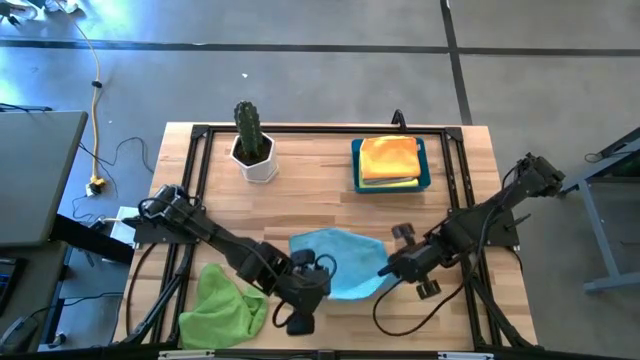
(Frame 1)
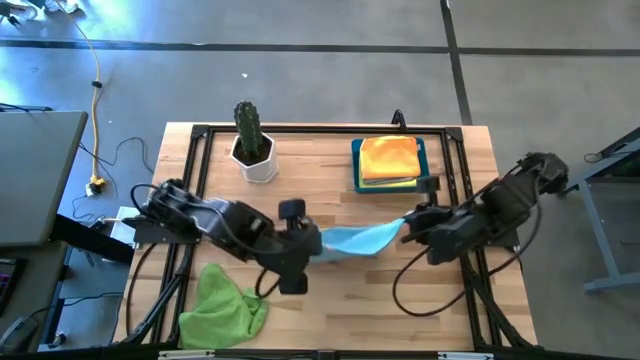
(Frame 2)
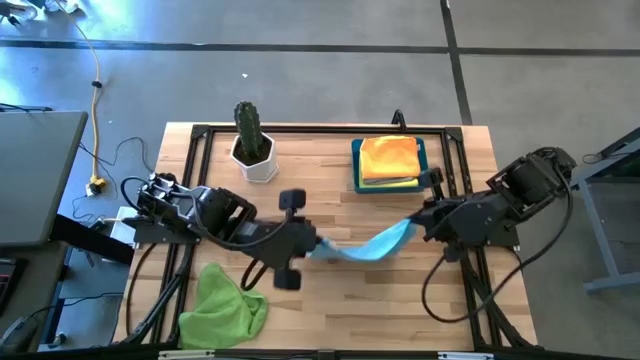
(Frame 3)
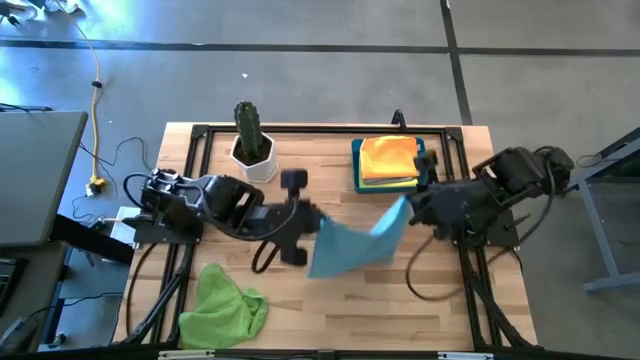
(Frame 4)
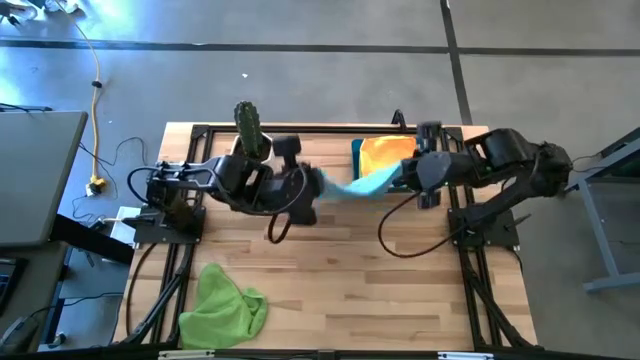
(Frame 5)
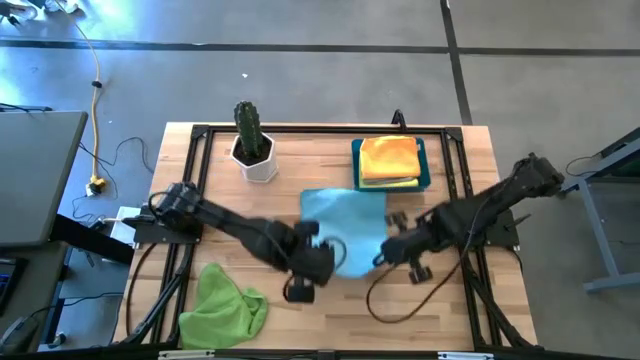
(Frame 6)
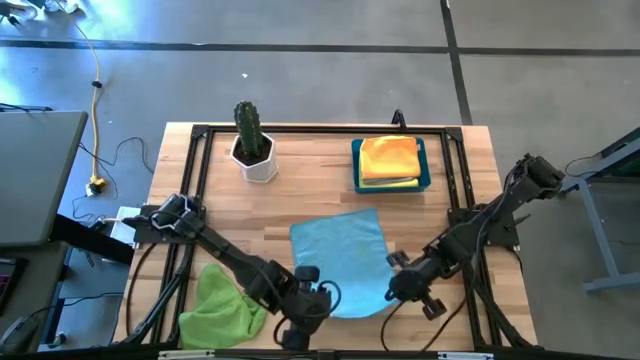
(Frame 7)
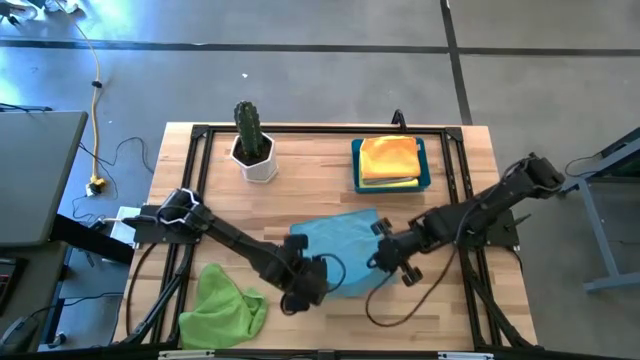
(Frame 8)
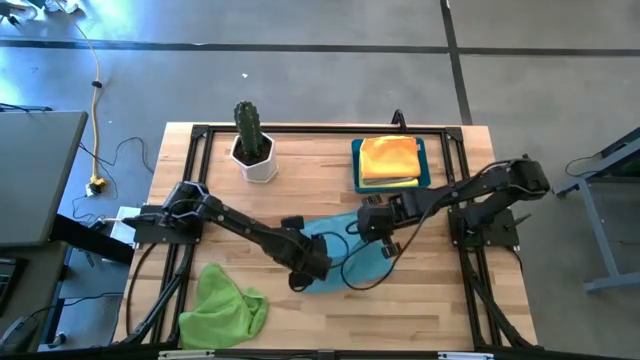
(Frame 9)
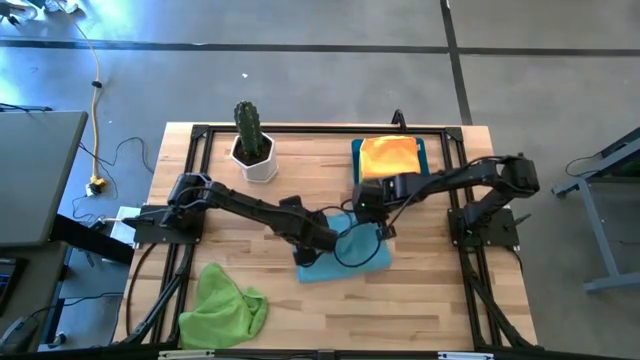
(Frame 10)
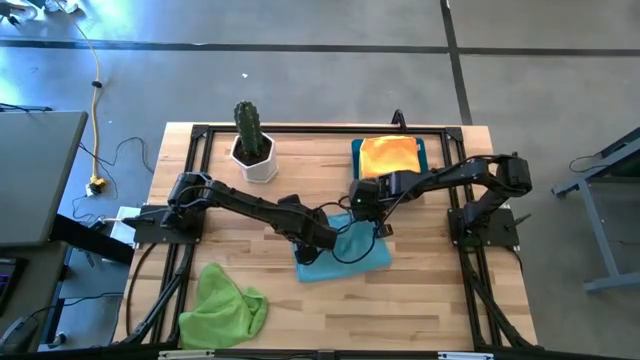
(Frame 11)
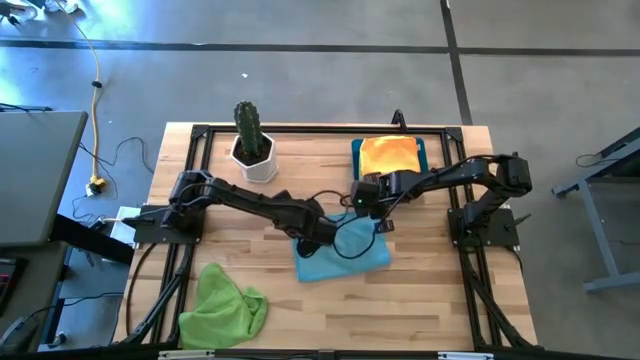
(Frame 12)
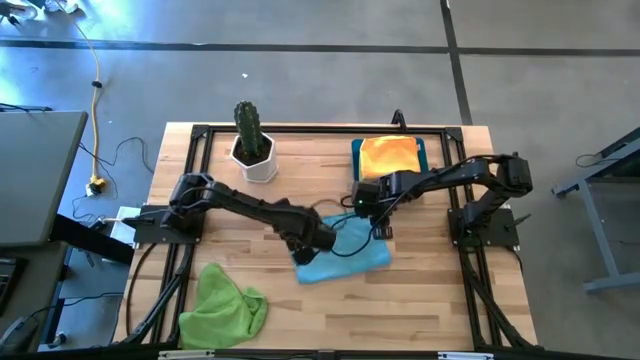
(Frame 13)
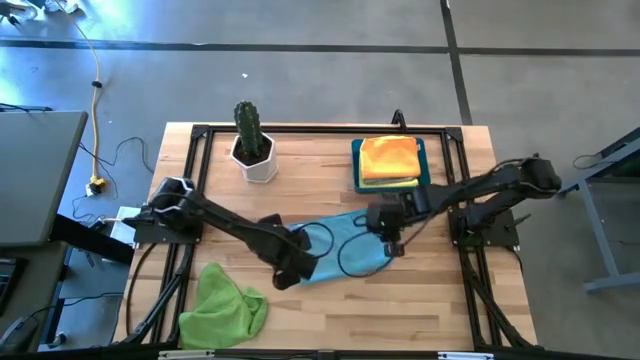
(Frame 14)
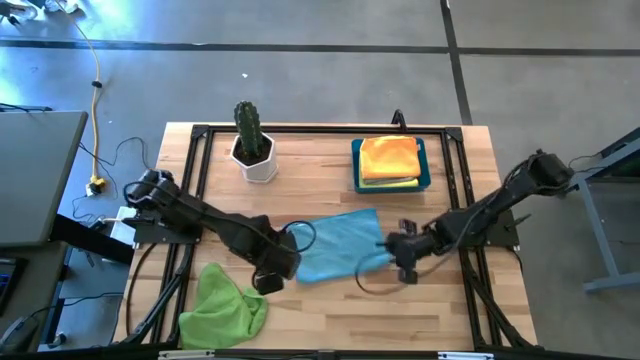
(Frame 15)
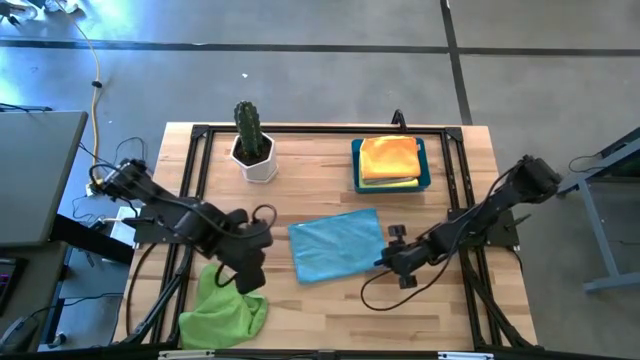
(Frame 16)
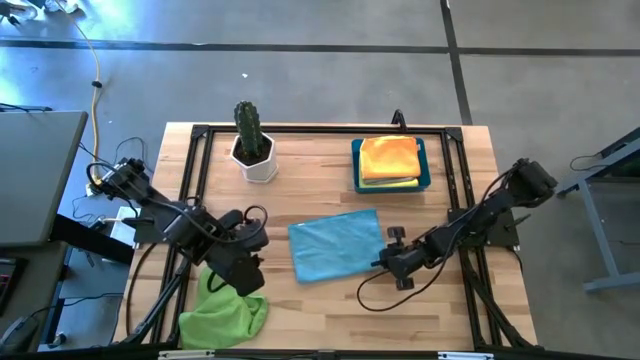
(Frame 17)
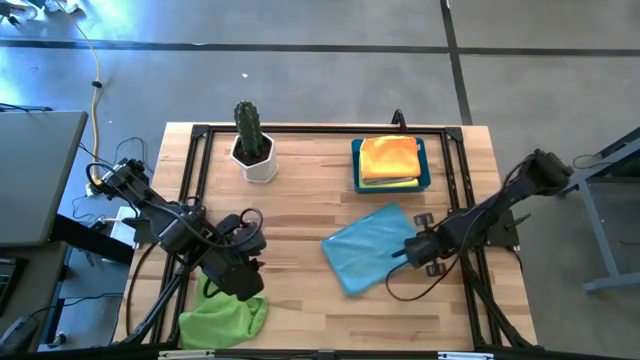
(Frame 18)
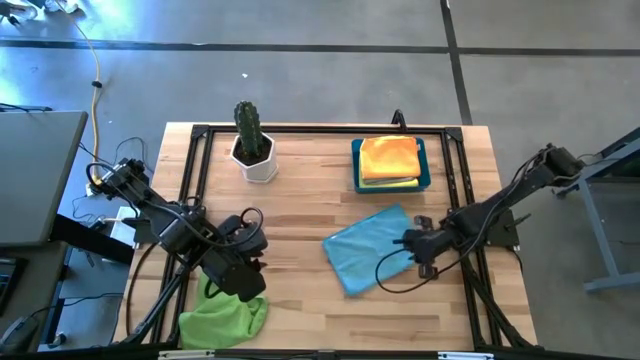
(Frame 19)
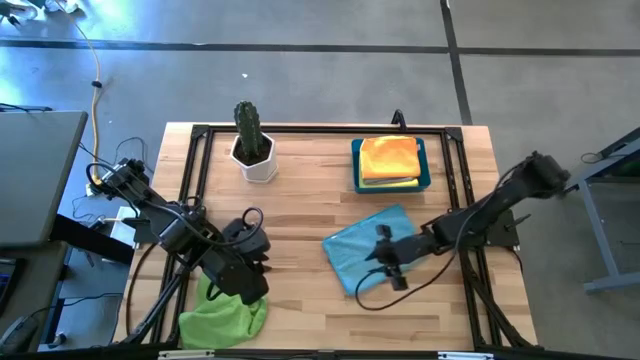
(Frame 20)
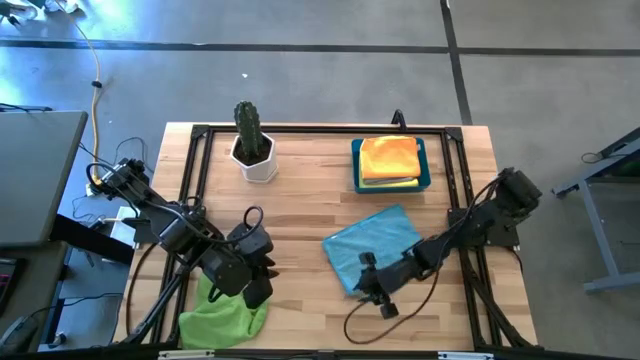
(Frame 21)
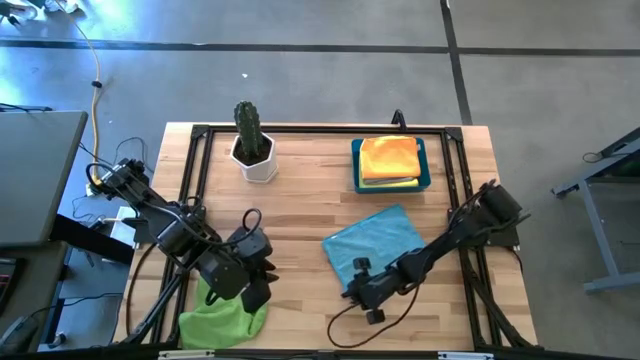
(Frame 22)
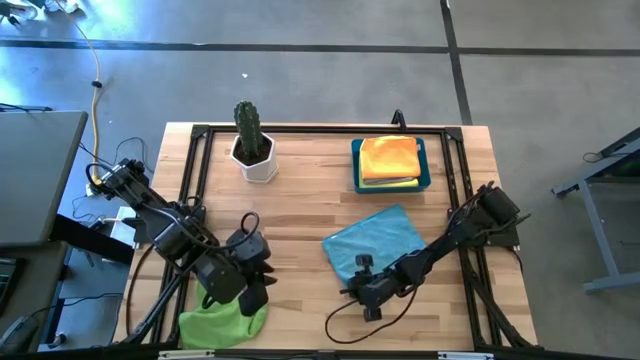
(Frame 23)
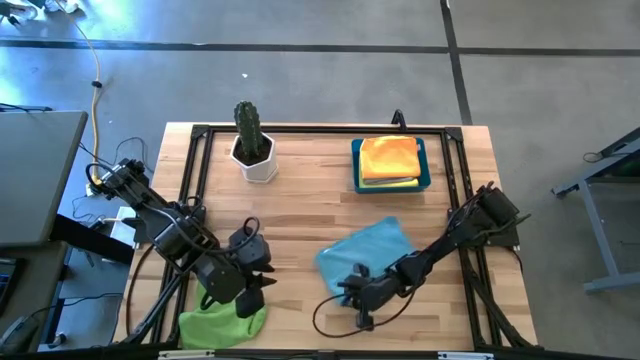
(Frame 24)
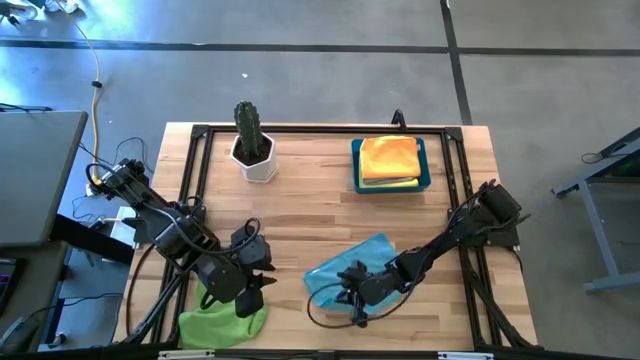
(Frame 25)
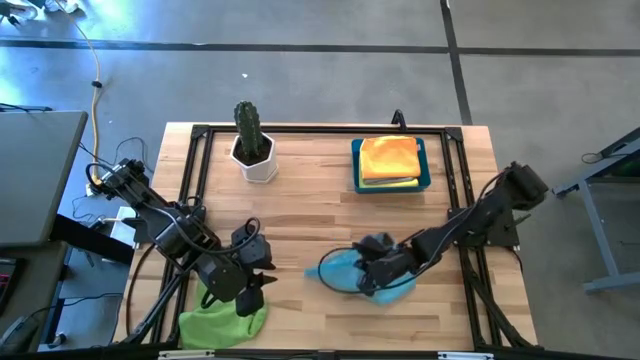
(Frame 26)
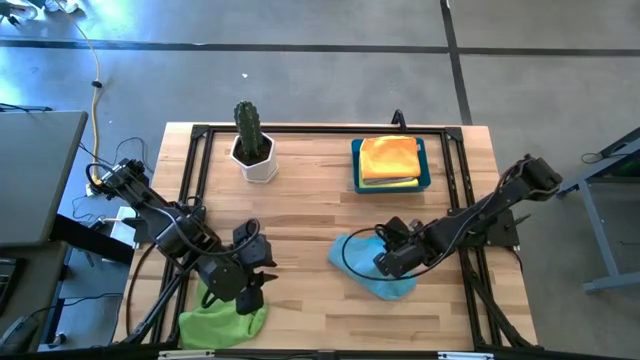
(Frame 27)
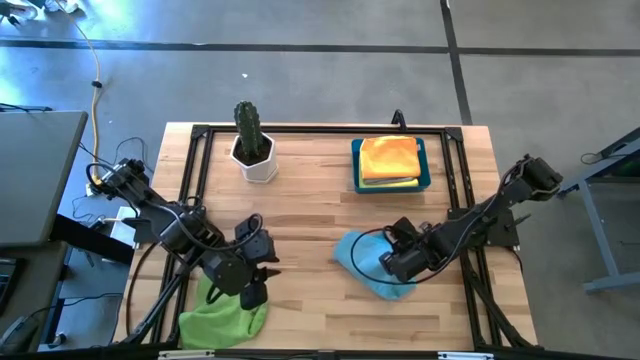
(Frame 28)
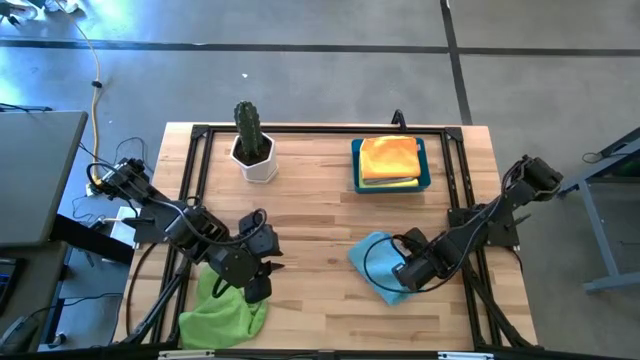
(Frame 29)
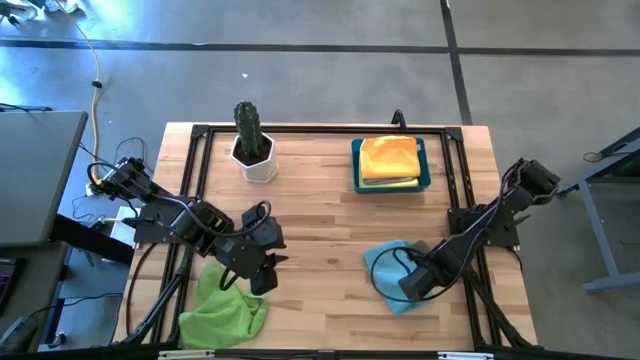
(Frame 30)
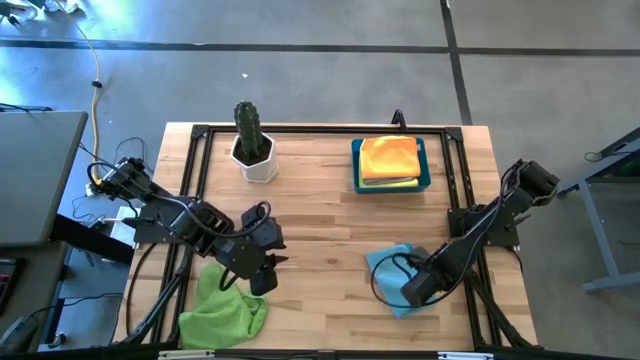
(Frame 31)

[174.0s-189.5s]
Task: Fold microfiber towels
Fold the blue microfiber cloth

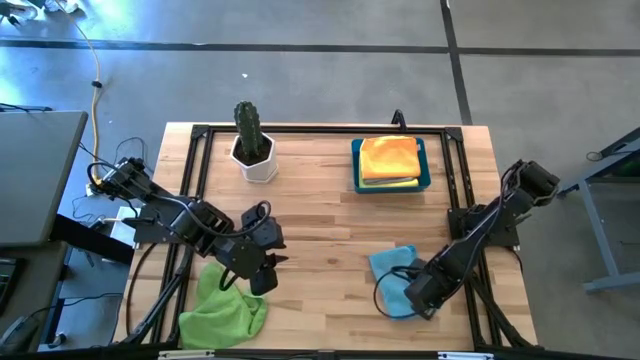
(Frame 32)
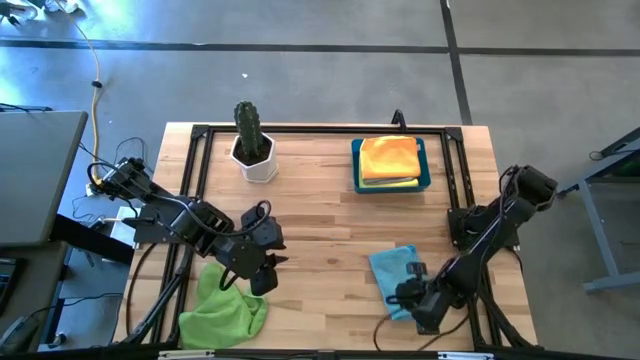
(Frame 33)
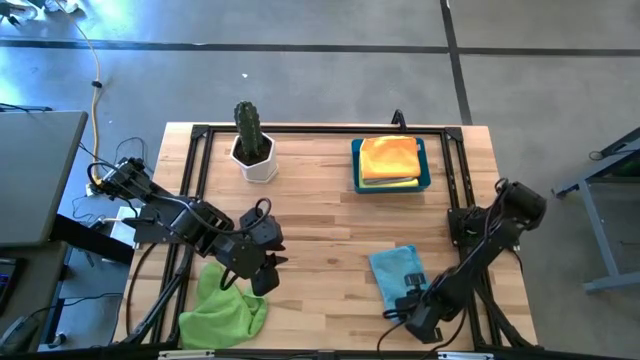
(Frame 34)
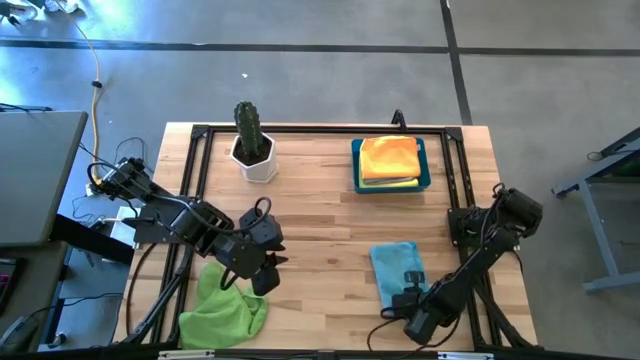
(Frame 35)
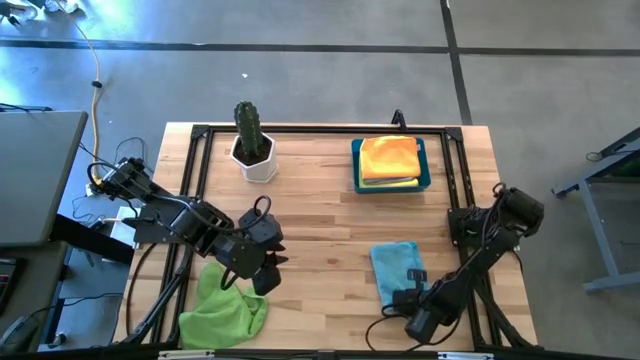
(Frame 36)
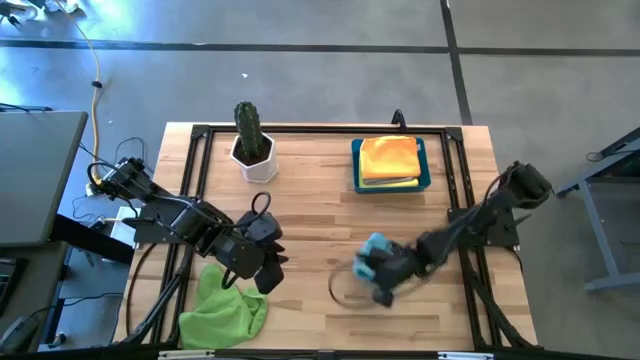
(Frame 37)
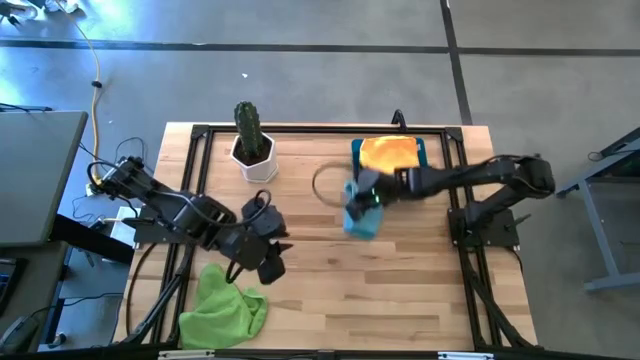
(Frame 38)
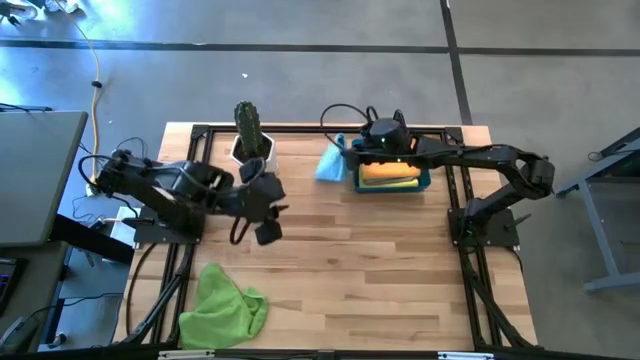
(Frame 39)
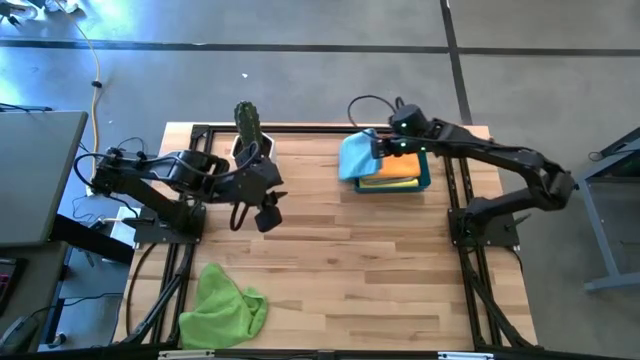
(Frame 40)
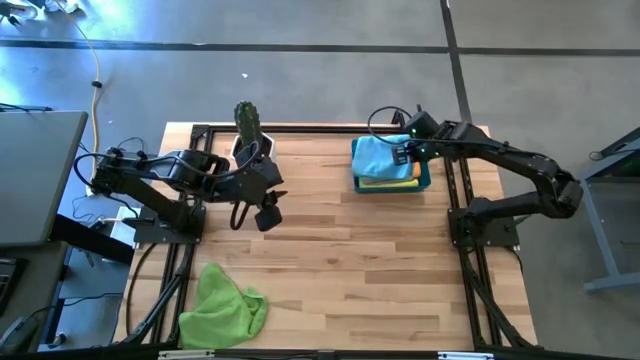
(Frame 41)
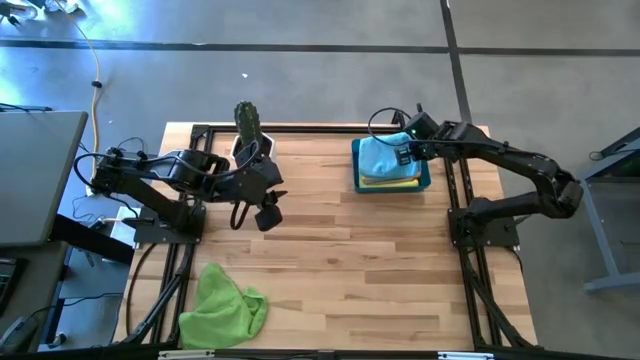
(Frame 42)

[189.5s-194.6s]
Put the folded blue microfiber cloth into the blue bin
